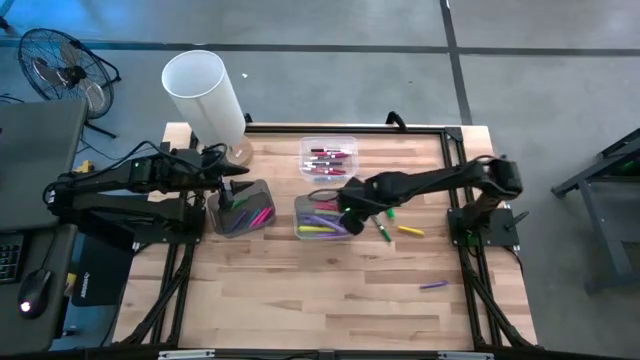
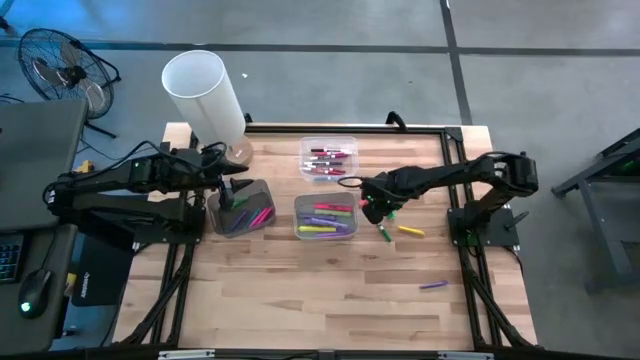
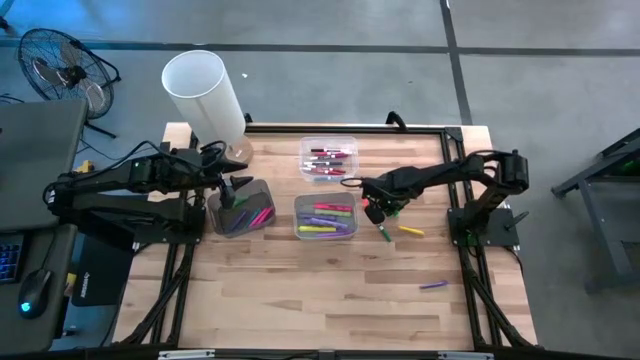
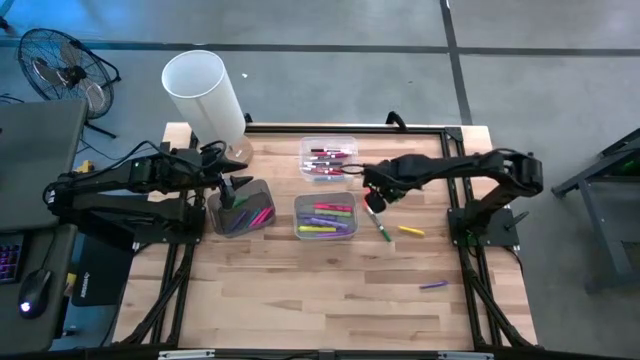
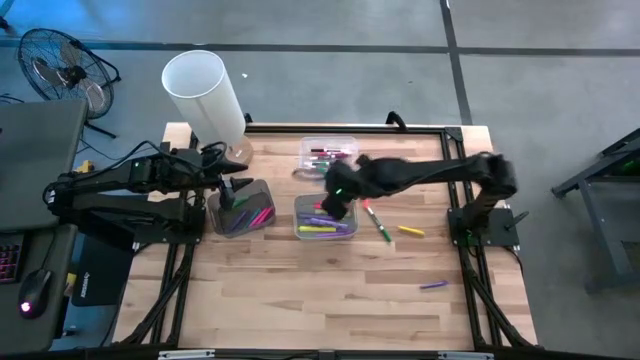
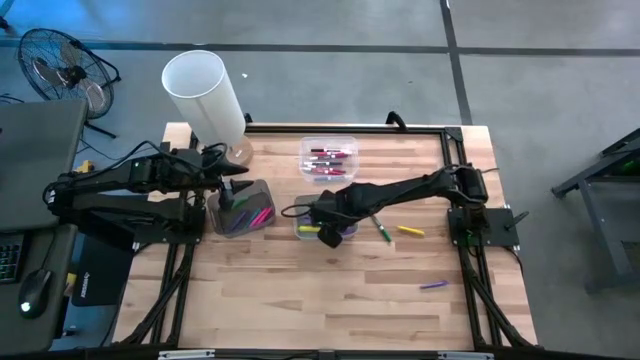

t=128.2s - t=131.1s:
Task: Pick & Place Markers
Put the green highlighter pen into the white bin

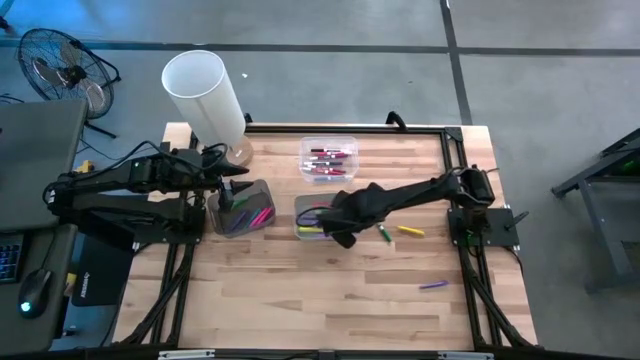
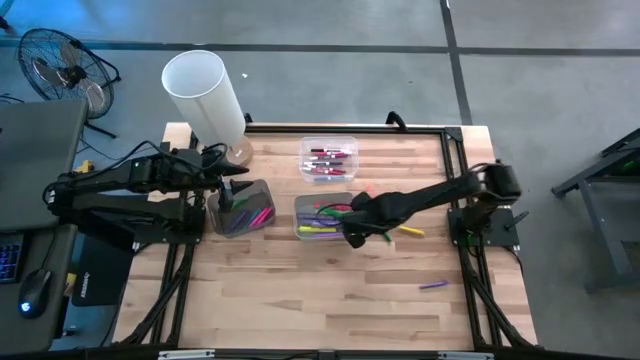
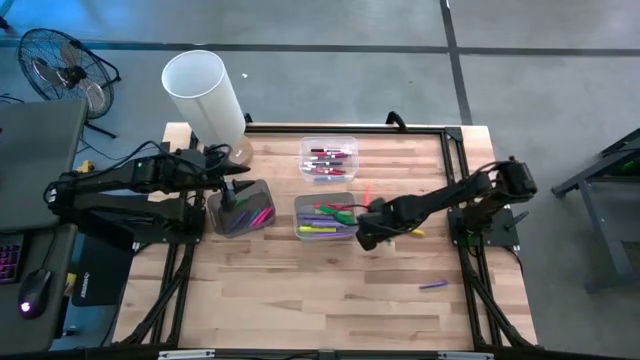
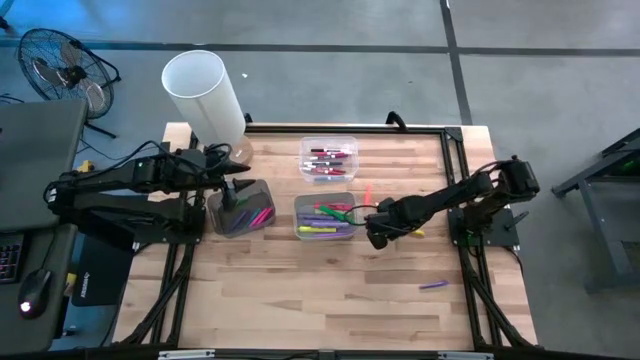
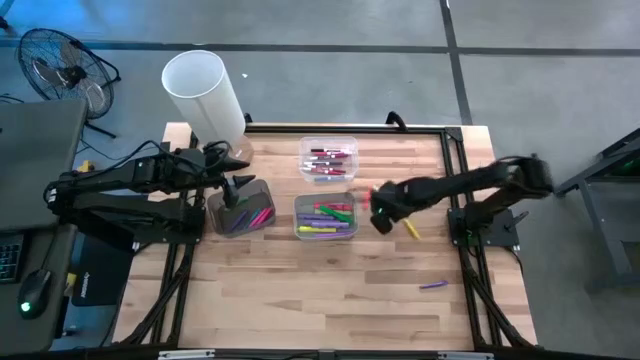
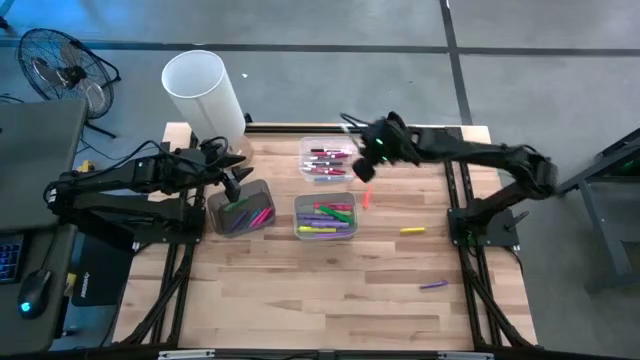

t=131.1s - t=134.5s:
Put the green marker pen into the transparent bin

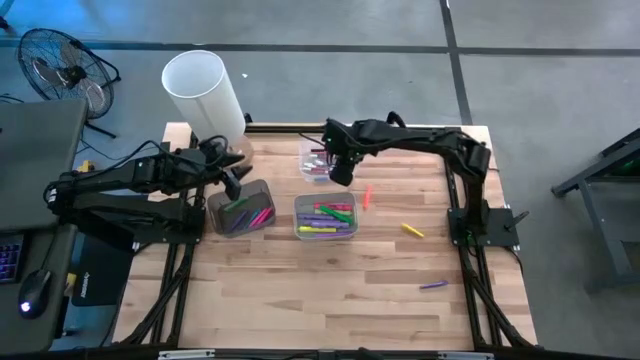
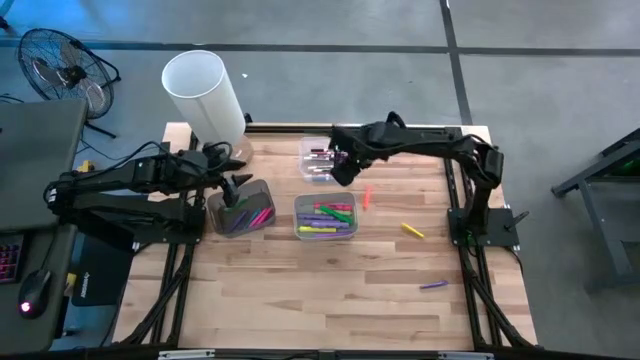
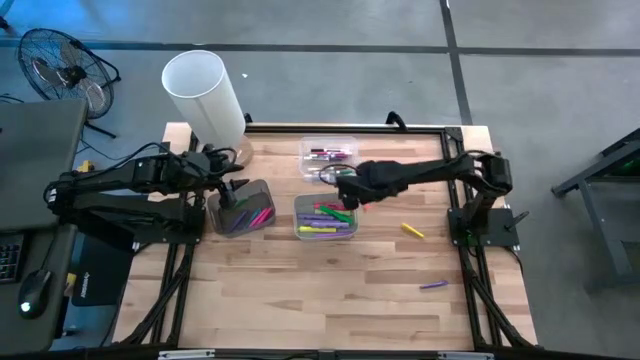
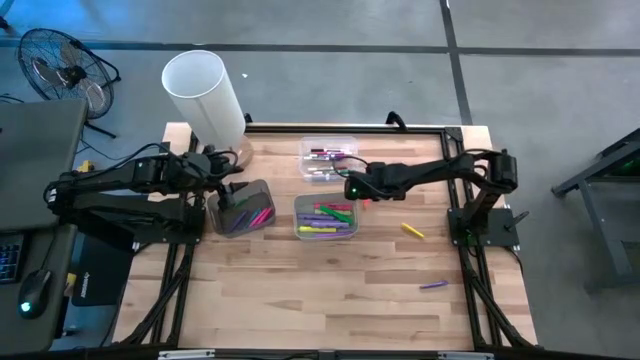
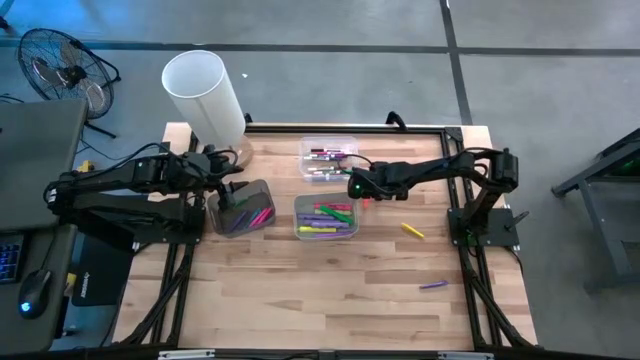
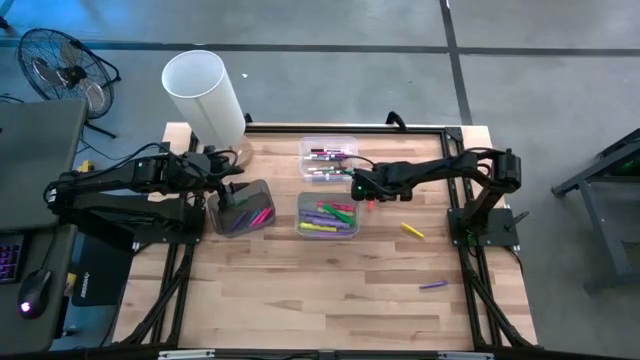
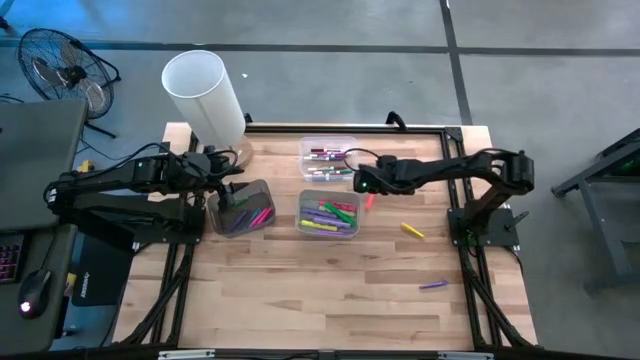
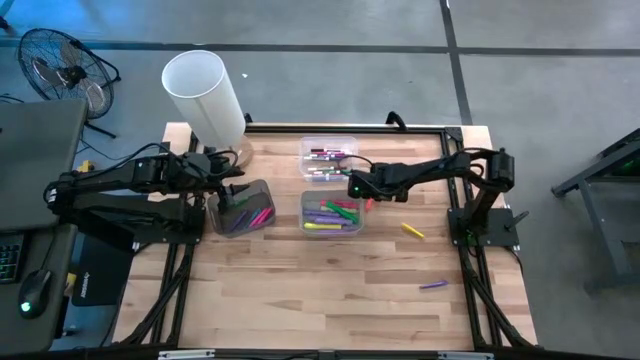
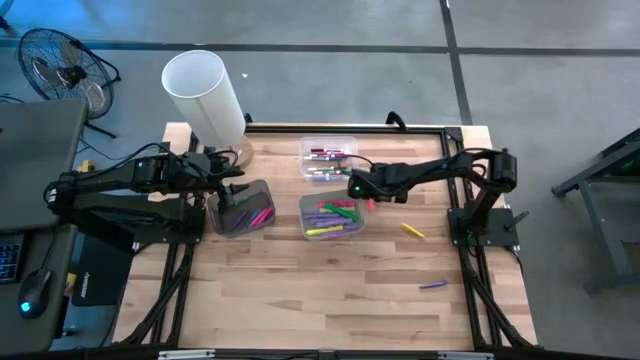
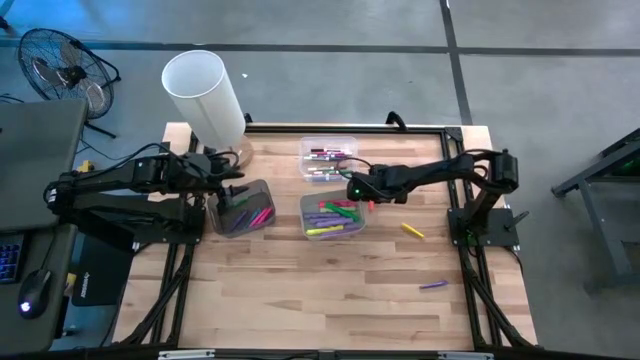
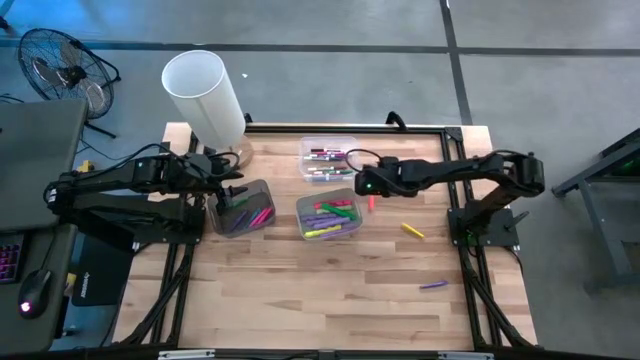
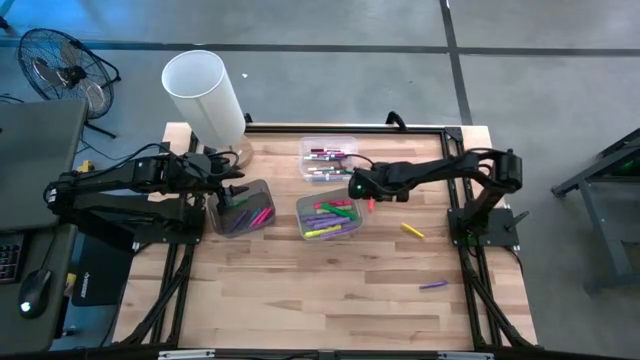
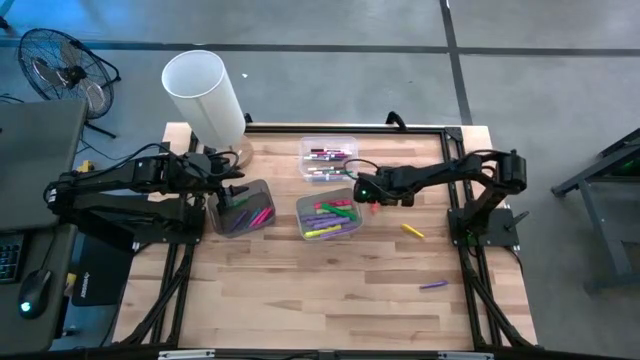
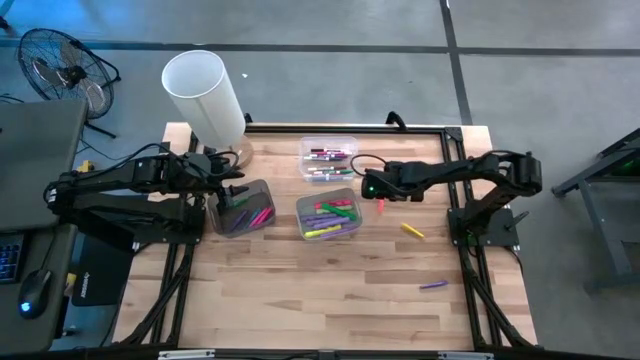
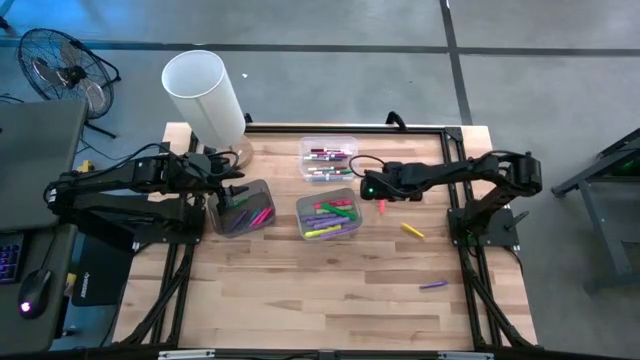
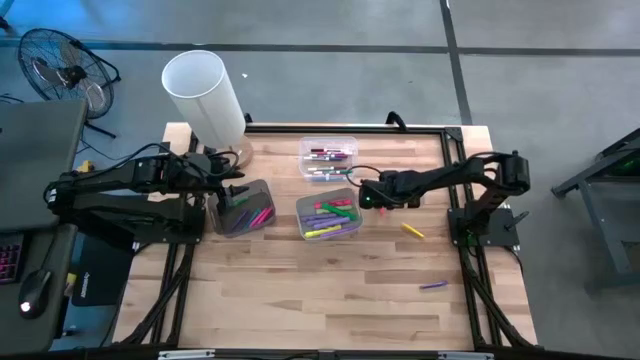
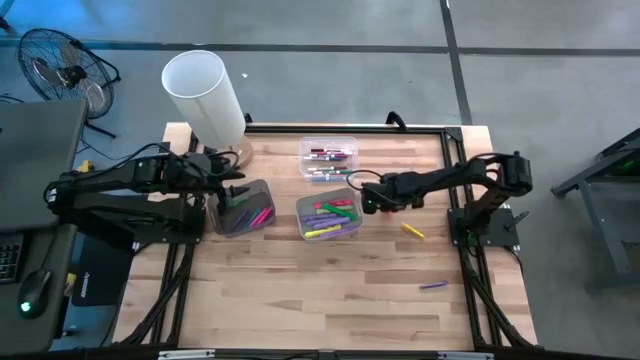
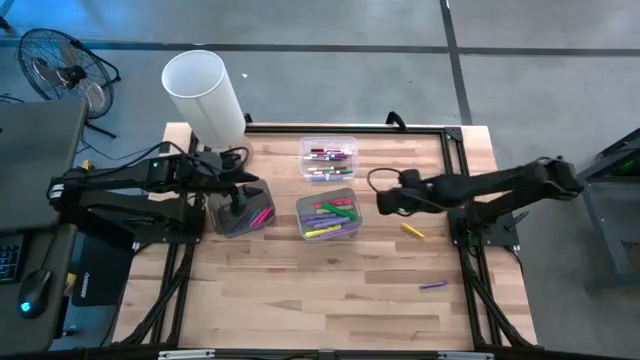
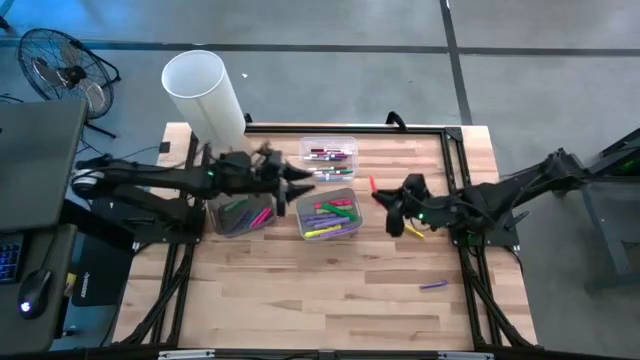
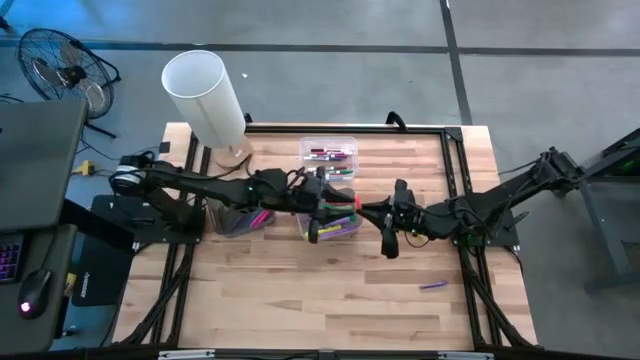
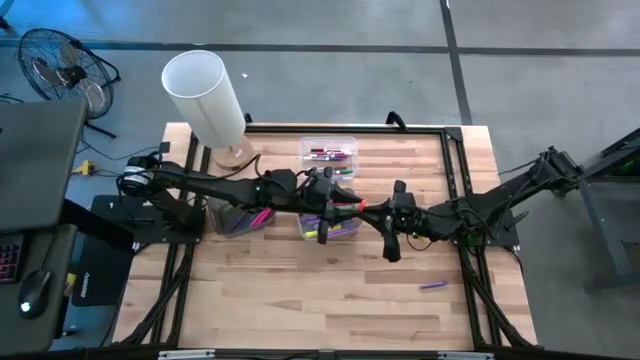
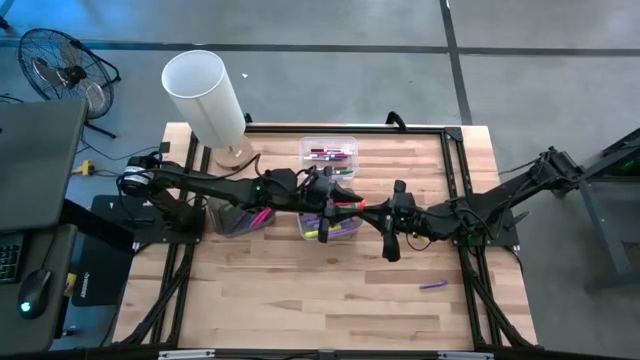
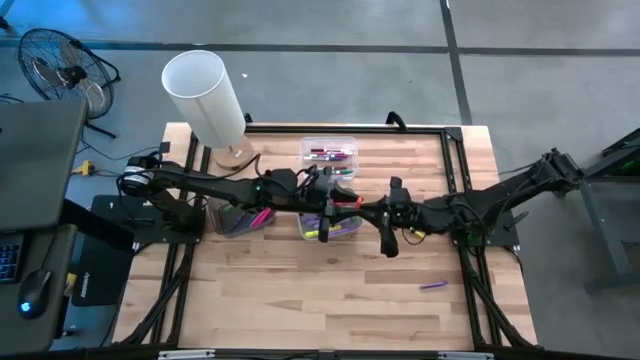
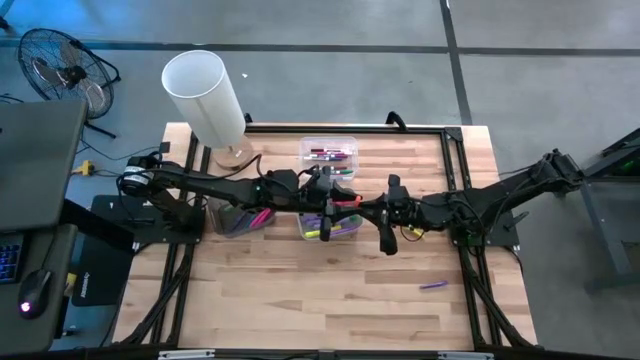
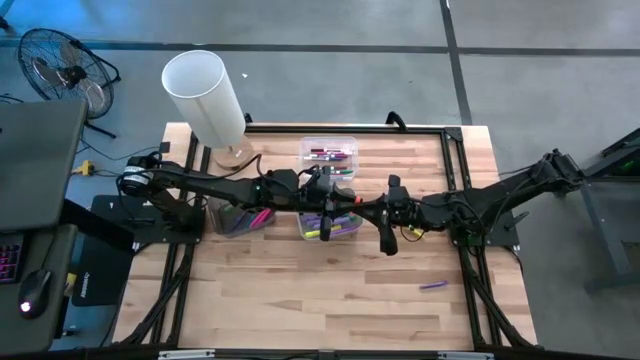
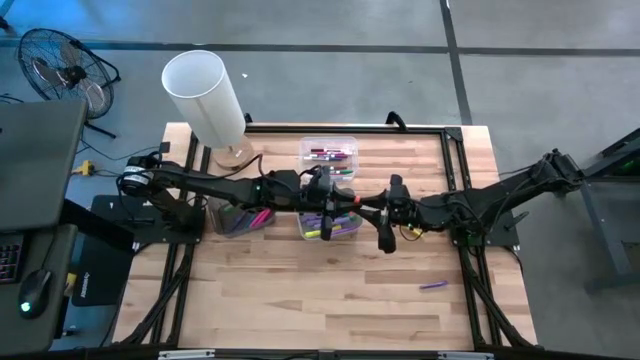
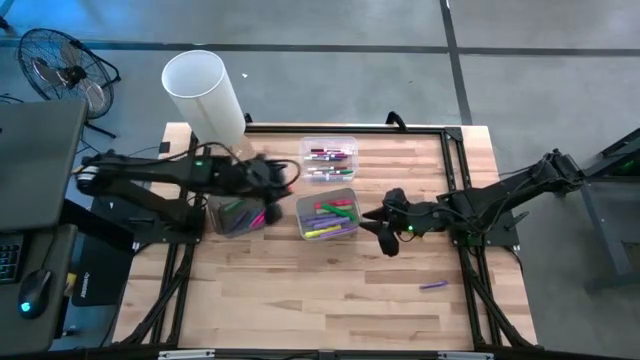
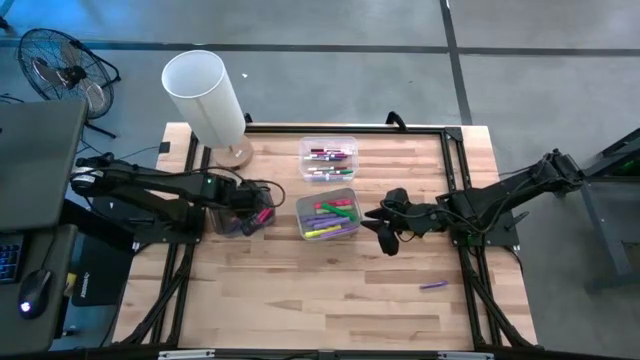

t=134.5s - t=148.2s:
Put the orange pen into the black bin

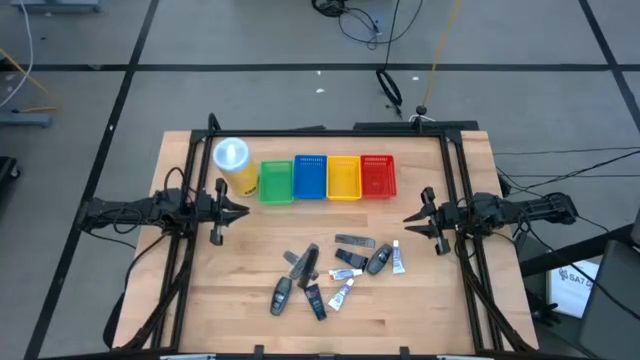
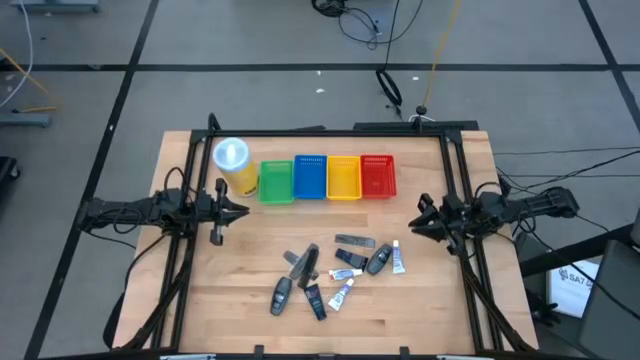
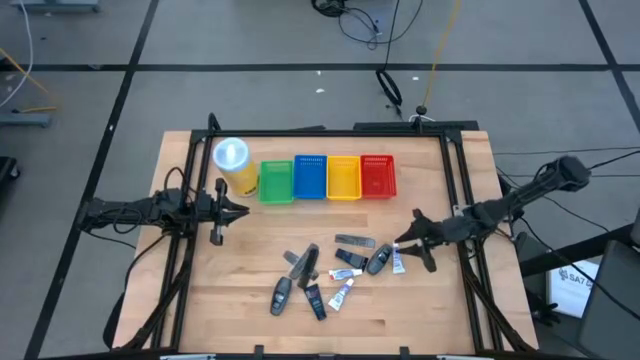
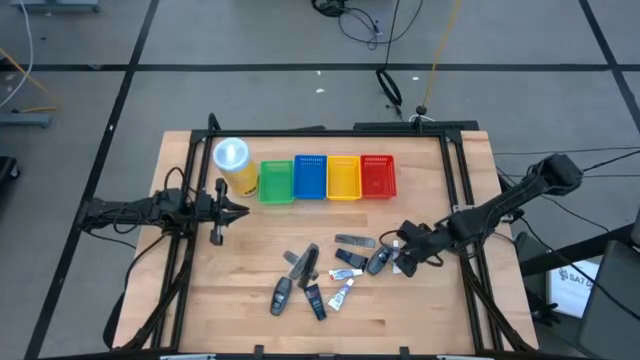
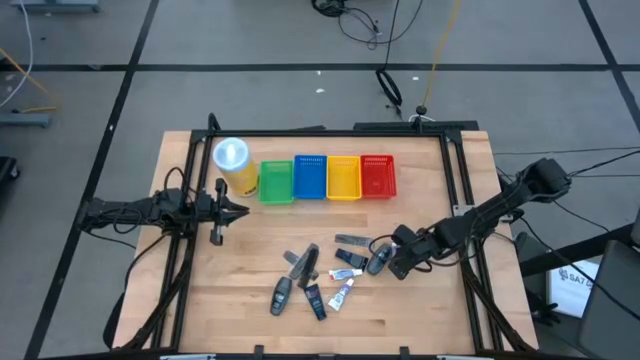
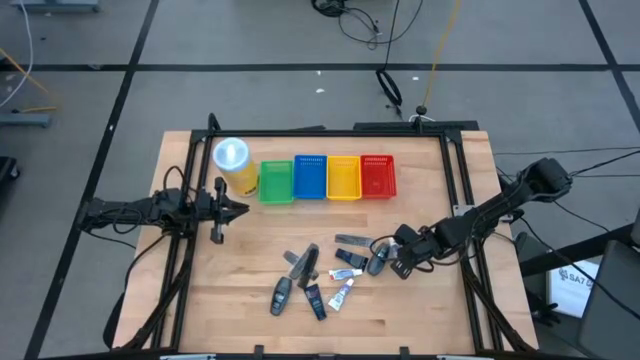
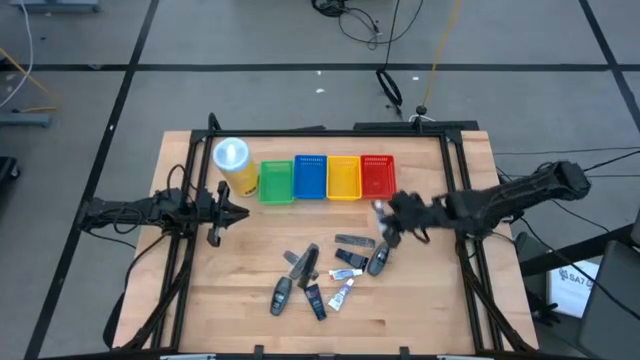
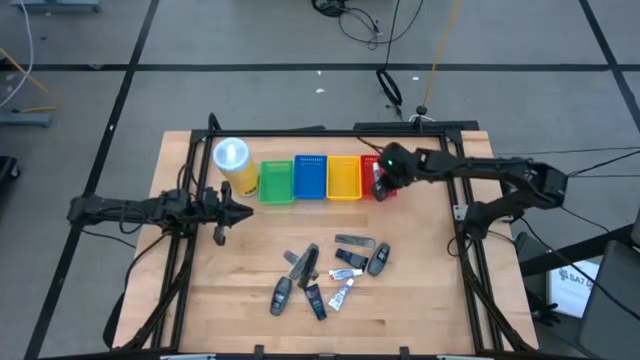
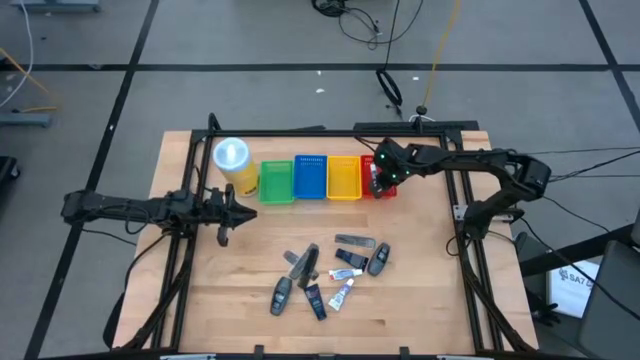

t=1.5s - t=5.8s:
Task: Pick & Place Travel size toiletries
Put the toothpaste into the red basket
